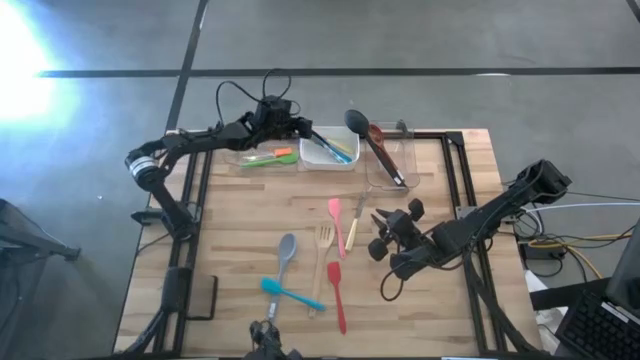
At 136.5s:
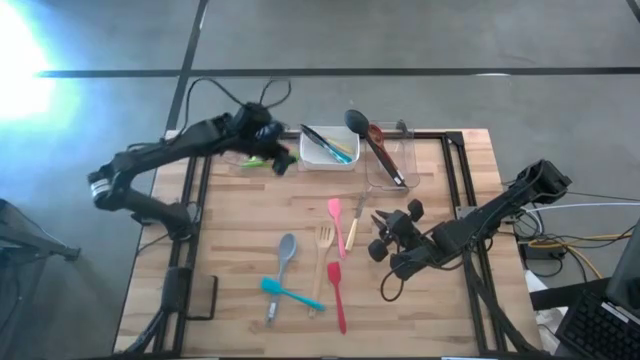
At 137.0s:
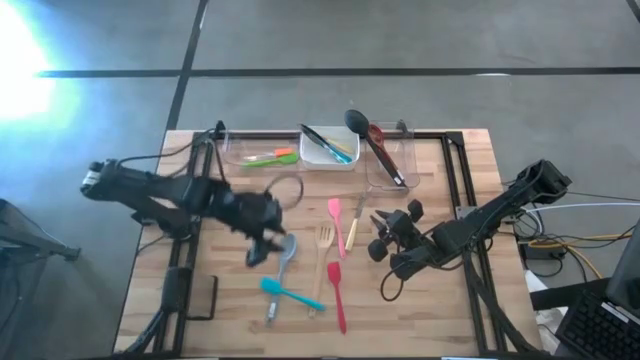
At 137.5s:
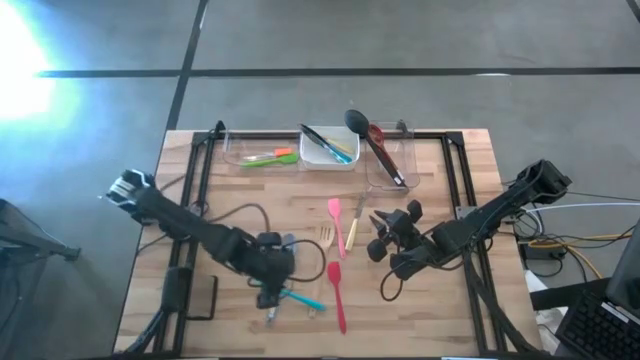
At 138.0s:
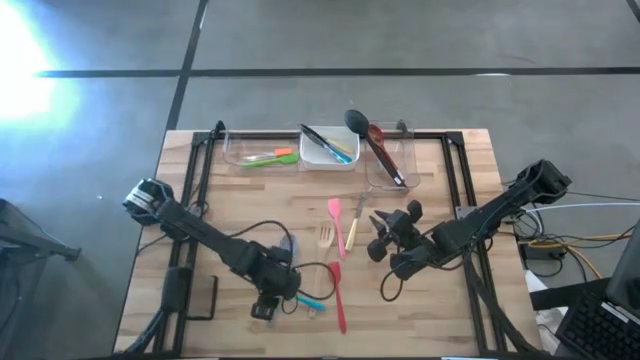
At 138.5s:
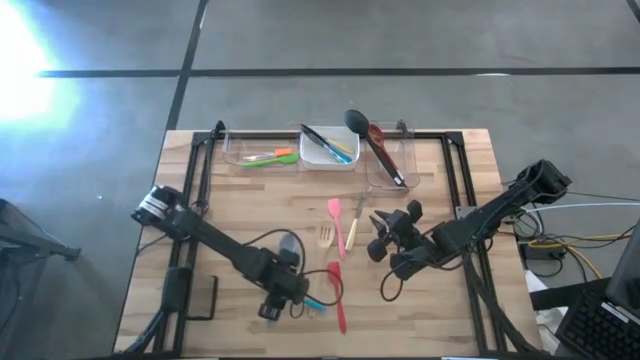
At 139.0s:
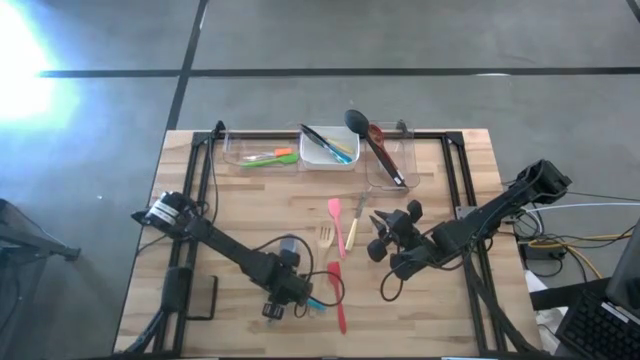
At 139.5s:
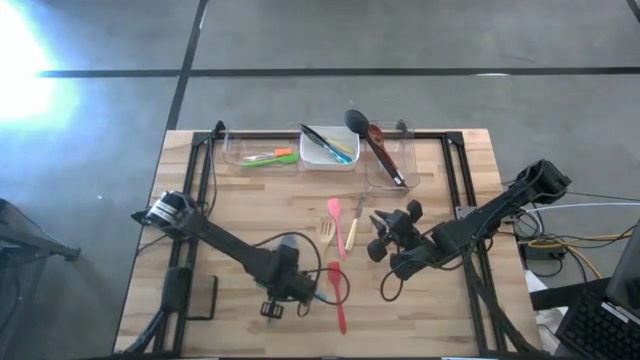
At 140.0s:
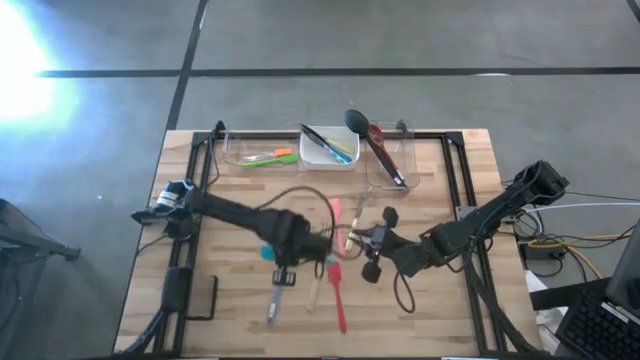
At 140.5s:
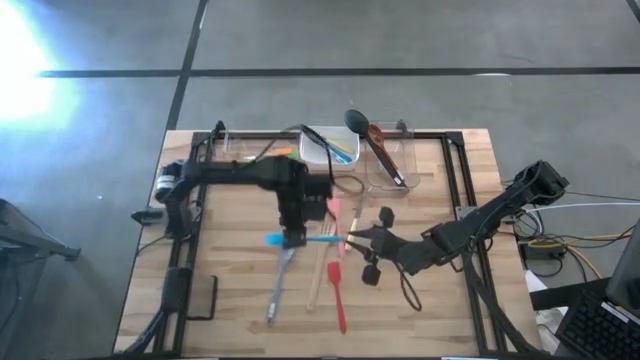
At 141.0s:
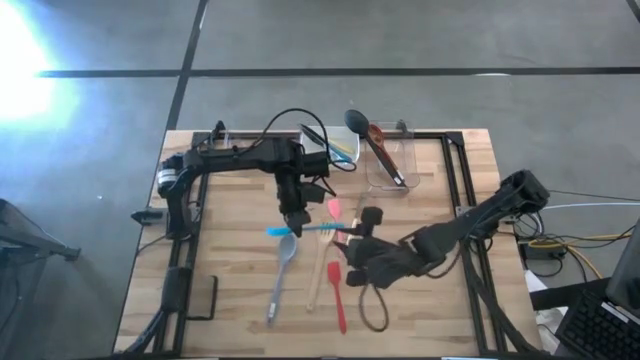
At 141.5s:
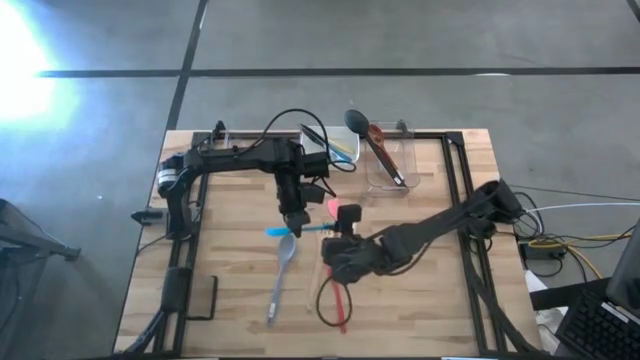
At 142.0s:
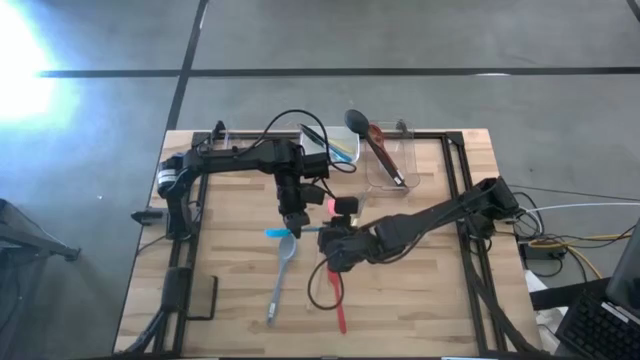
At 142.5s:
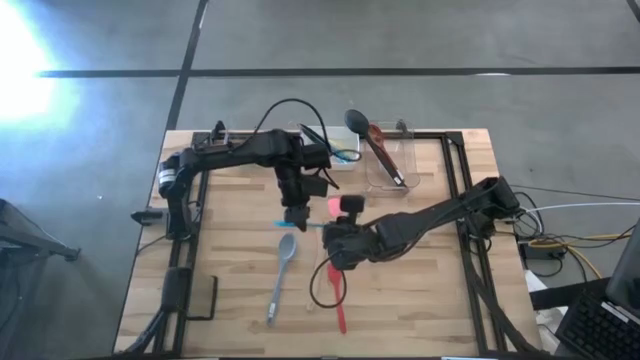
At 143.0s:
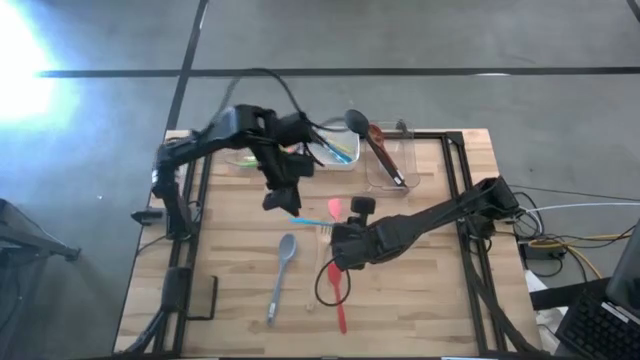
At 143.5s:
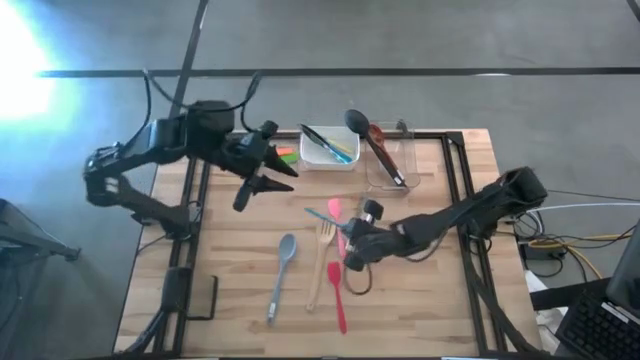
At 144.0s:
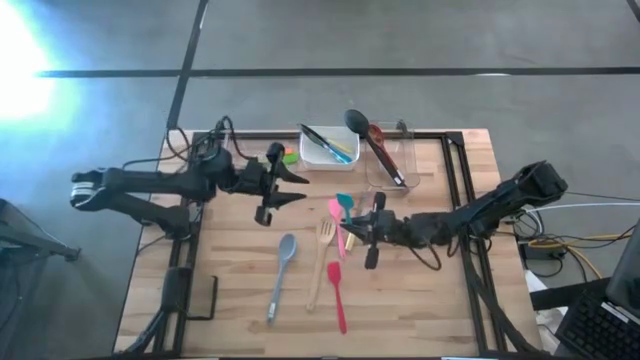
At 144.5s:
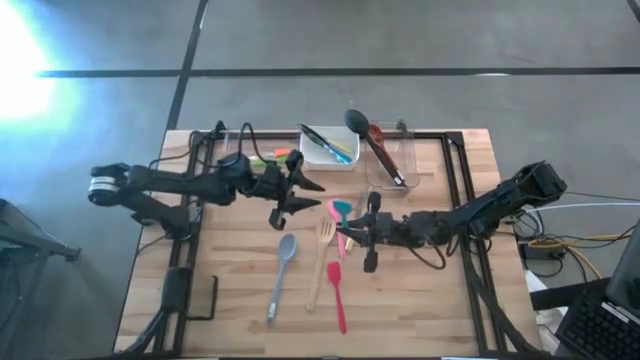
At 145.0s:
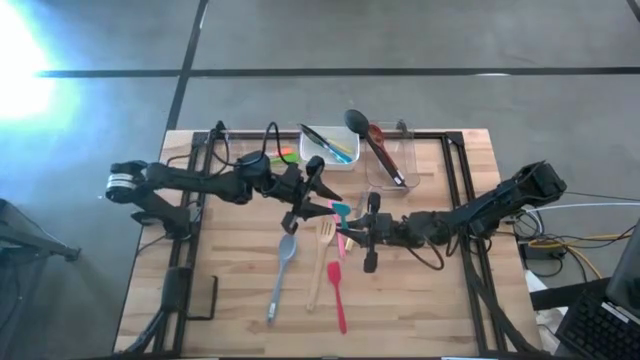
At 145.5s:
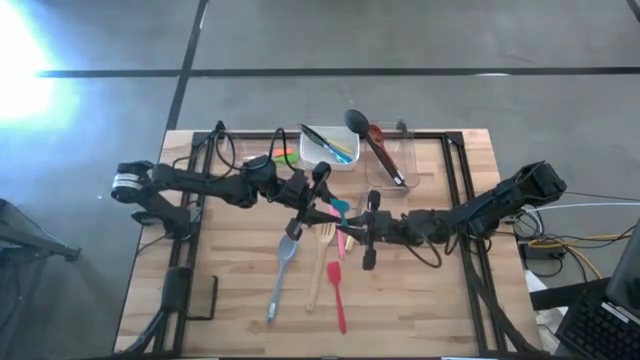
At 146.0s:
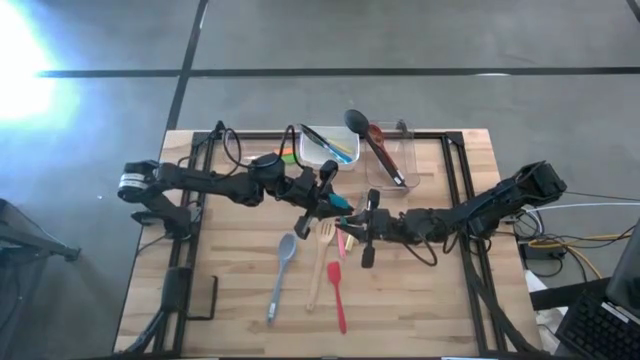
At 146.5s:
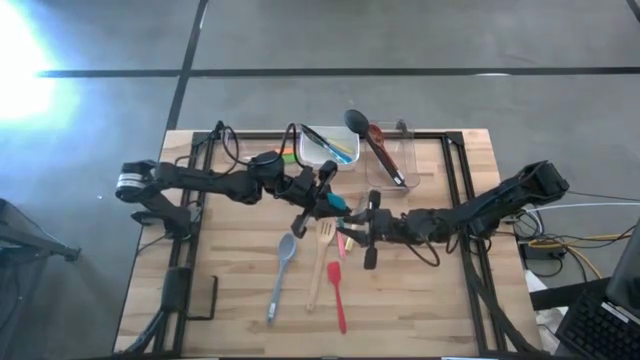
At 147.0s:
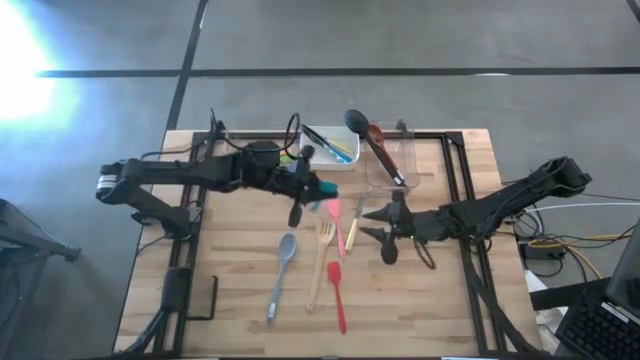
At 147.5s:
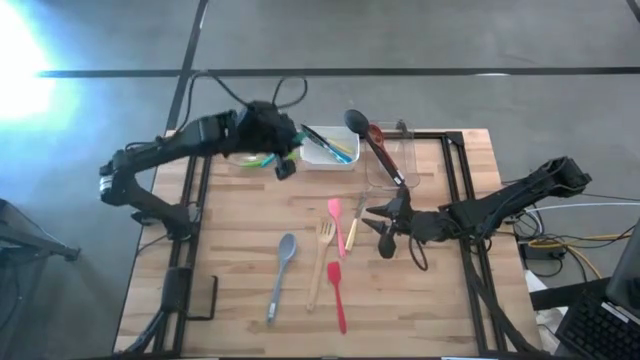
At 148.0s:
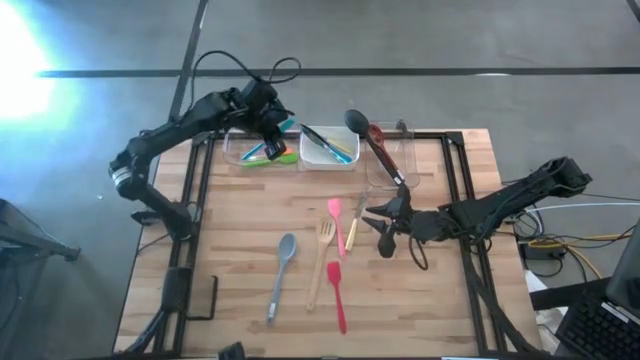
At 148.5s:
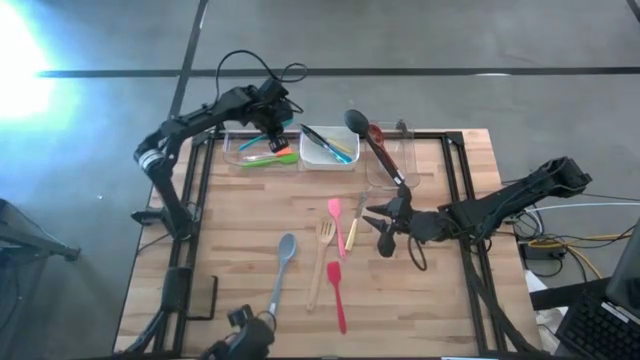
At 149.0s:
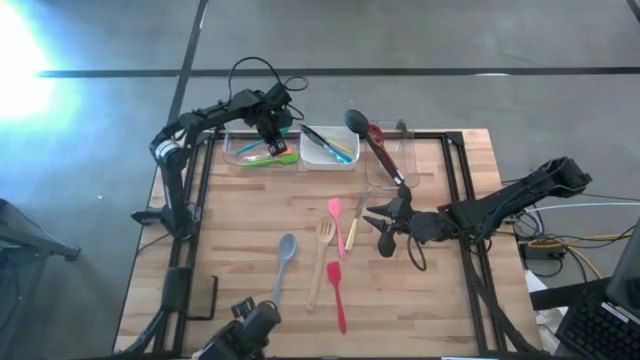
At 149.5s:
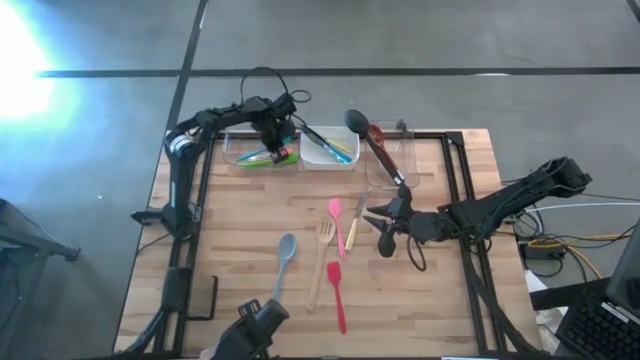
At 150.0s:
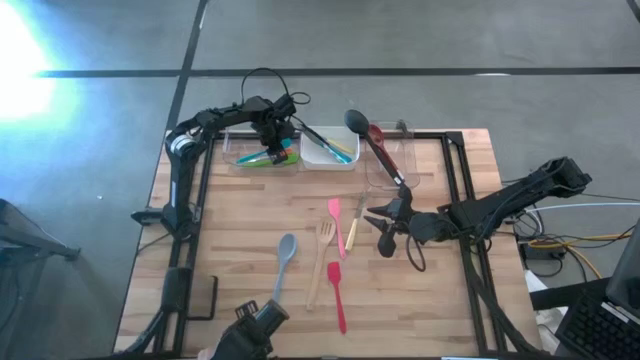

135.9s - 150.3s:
Task: Pick & Place Kitchen Items
Put the blue spatula into the left transparent bin

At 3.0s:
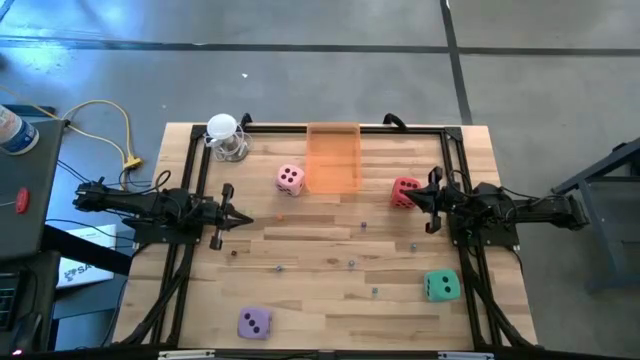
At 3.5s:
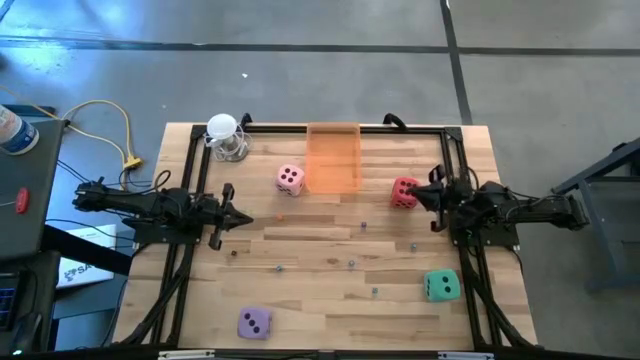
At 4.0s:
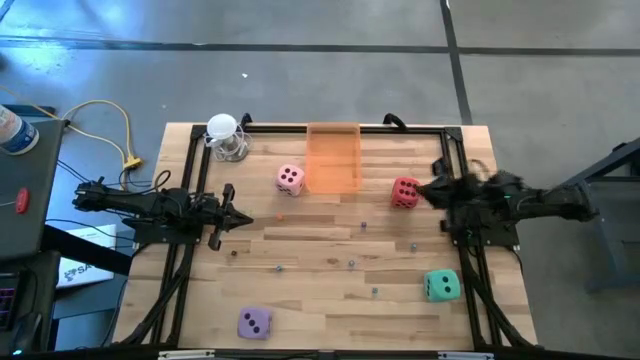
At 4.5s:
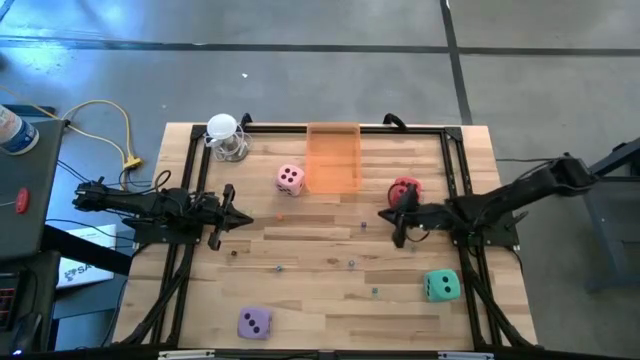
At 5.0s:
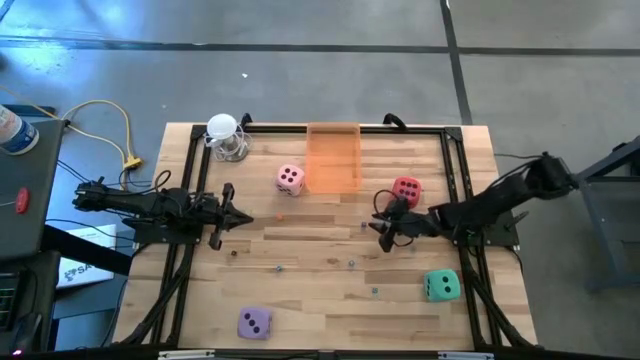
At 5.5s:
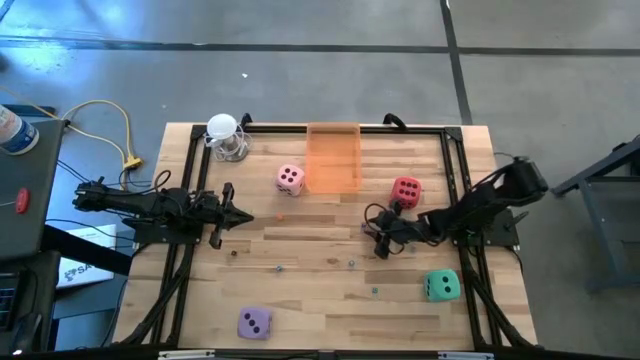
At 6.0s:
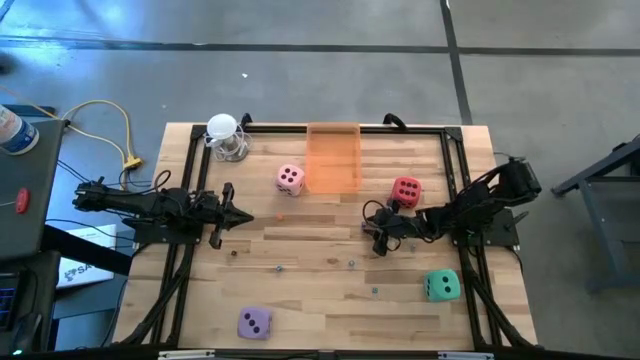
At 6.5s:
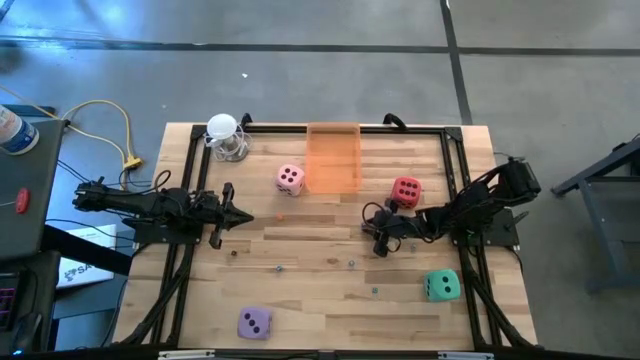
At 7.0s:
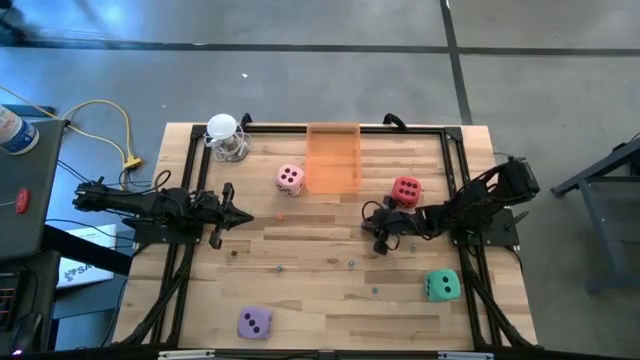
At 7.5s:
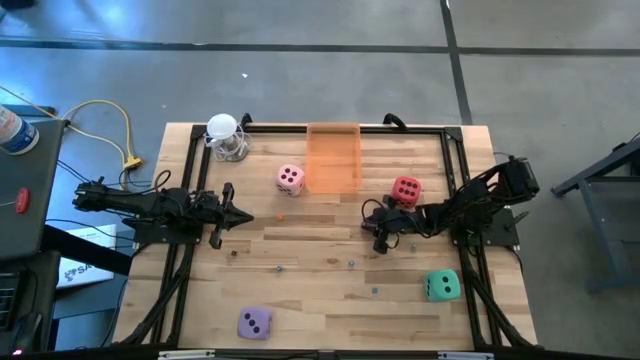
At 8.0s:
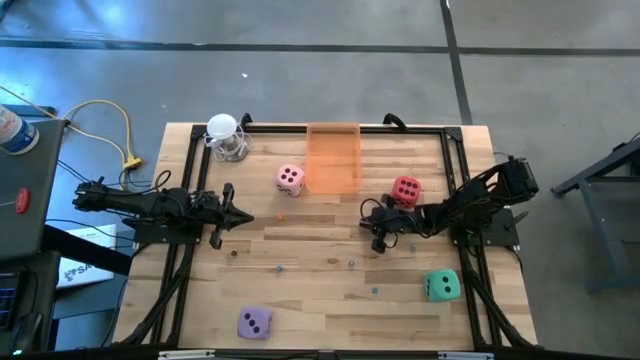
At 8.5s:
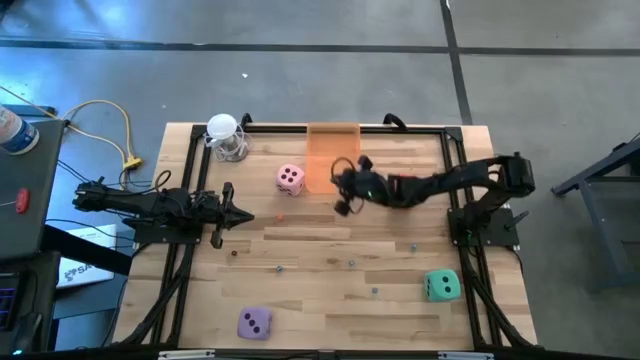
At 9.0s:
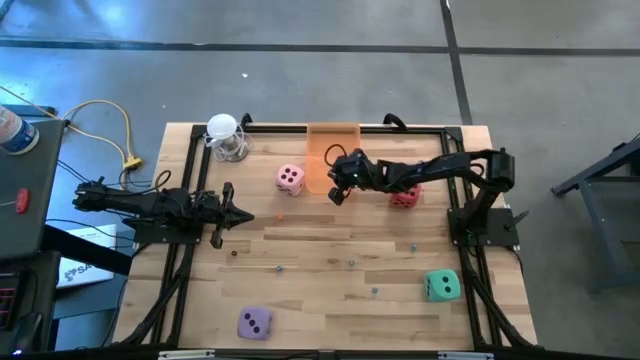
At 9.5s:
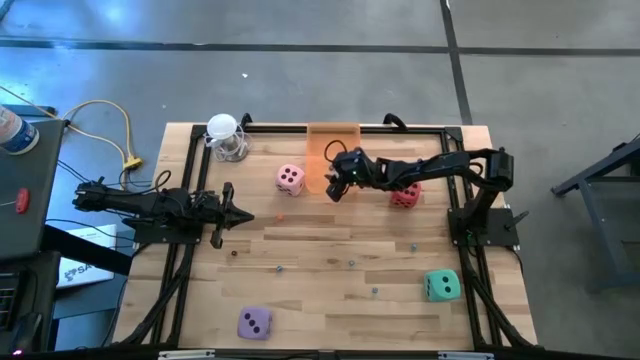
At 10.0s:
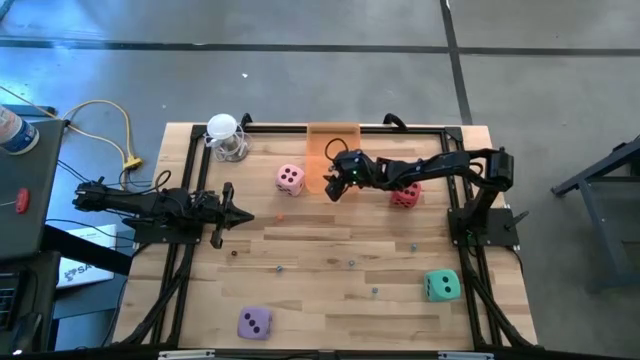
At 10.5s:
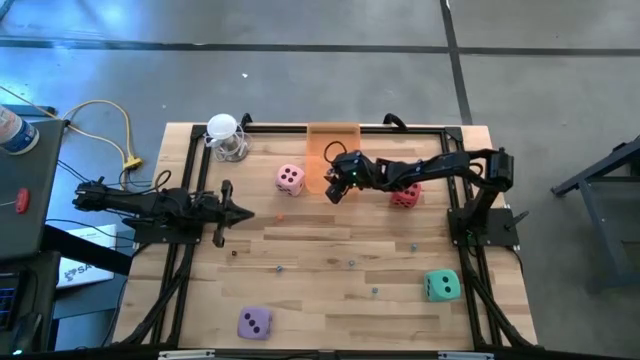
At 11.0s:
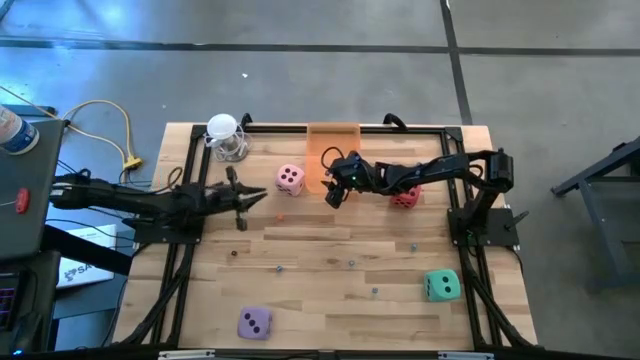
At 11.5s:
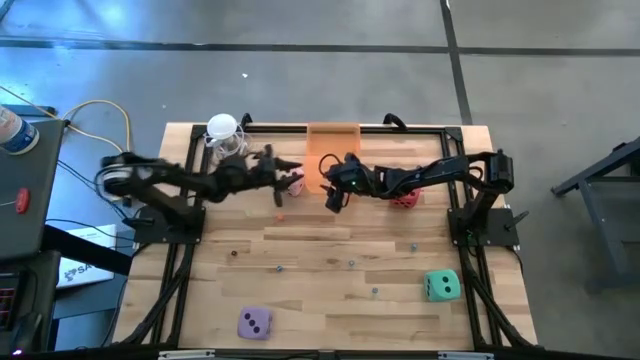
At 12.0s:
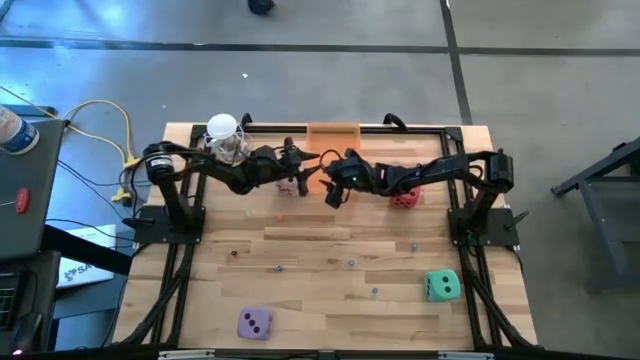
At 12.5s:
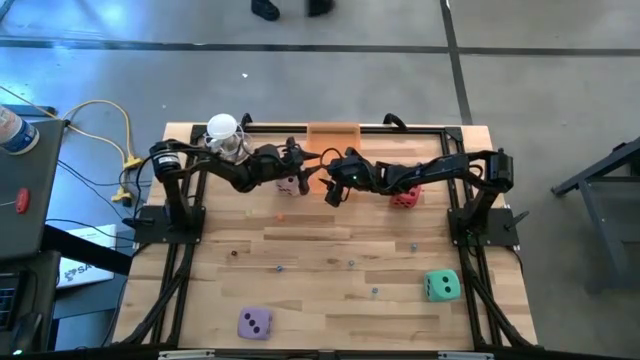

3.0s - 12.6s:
Task: Pick & Place Dice
Put the dark blue die into the orange bin
